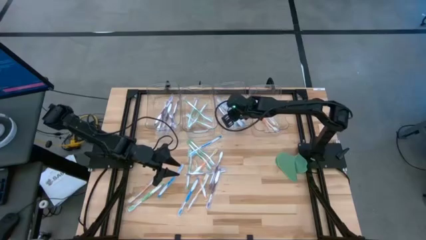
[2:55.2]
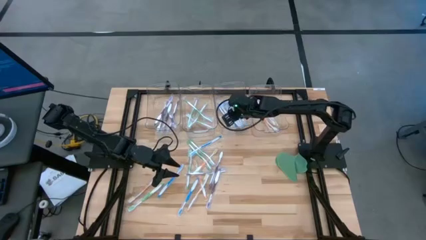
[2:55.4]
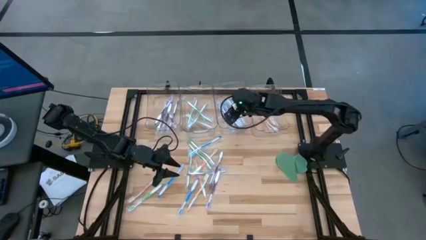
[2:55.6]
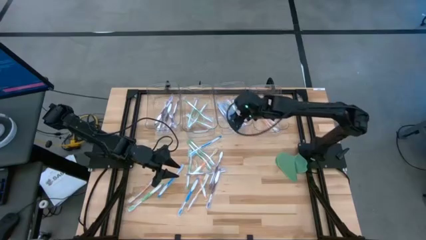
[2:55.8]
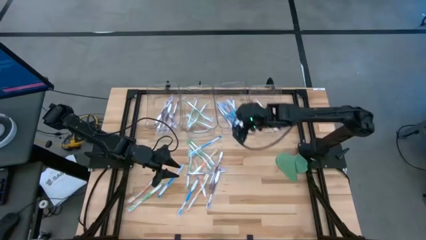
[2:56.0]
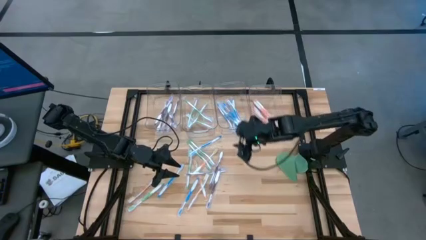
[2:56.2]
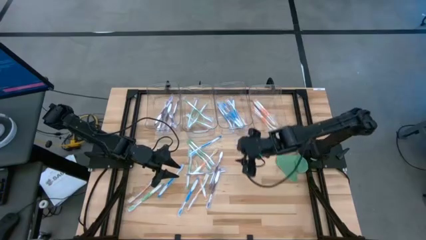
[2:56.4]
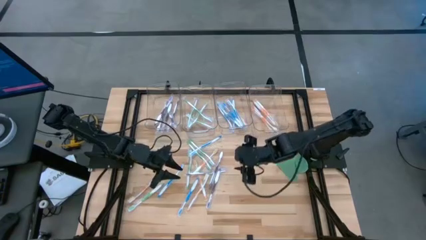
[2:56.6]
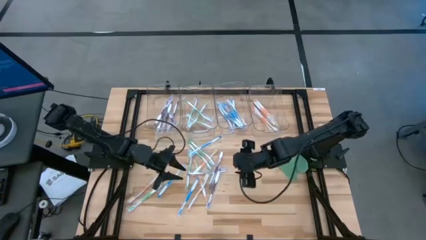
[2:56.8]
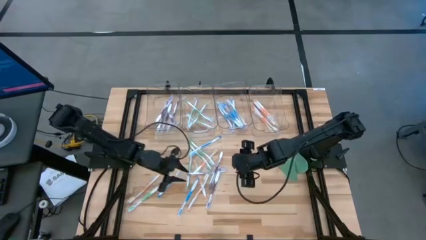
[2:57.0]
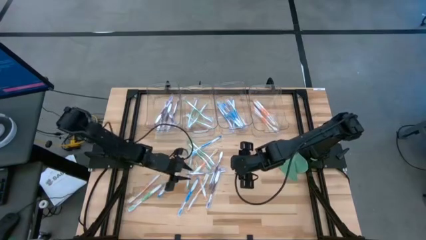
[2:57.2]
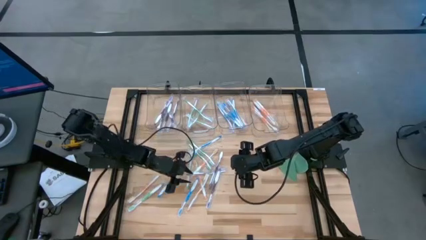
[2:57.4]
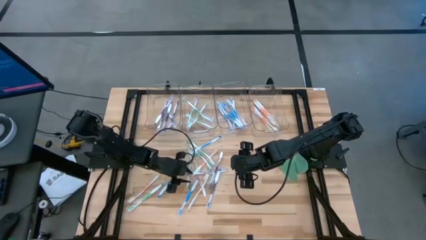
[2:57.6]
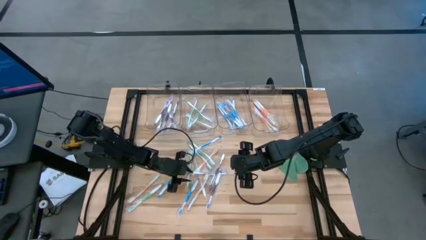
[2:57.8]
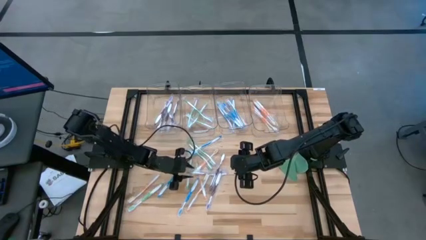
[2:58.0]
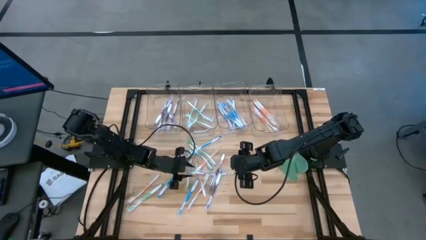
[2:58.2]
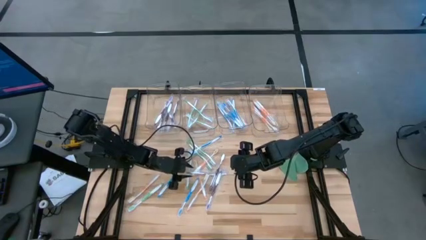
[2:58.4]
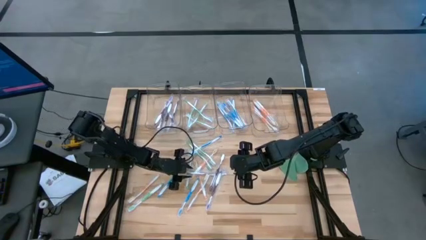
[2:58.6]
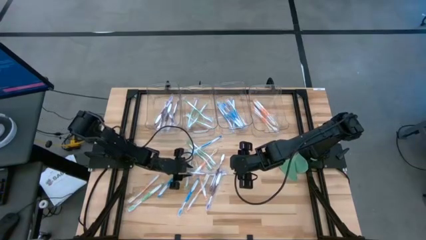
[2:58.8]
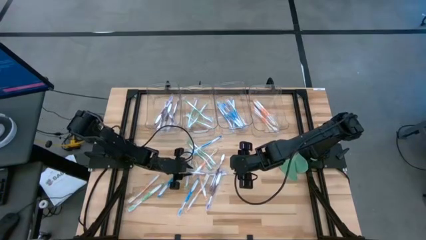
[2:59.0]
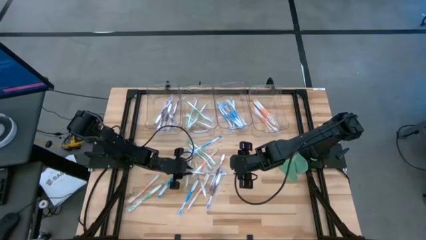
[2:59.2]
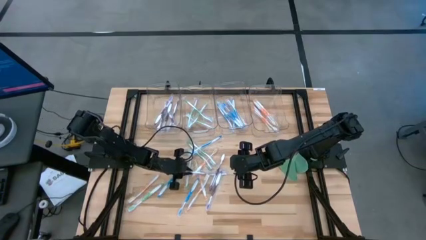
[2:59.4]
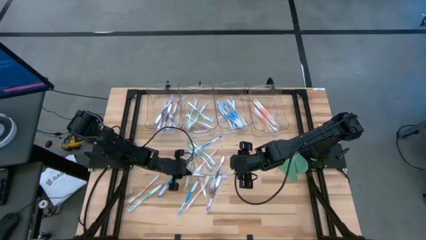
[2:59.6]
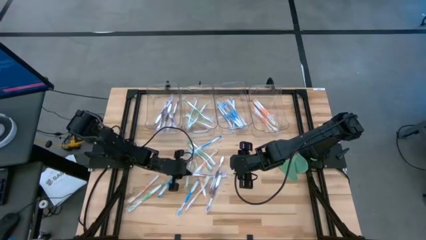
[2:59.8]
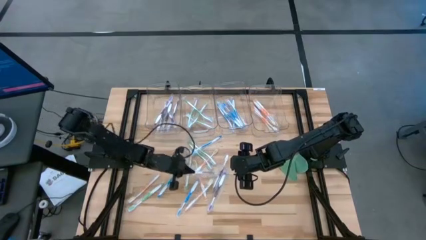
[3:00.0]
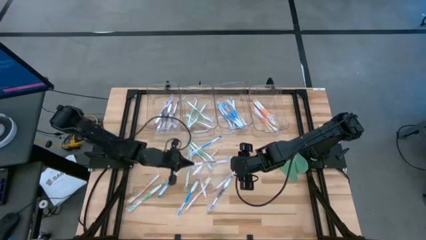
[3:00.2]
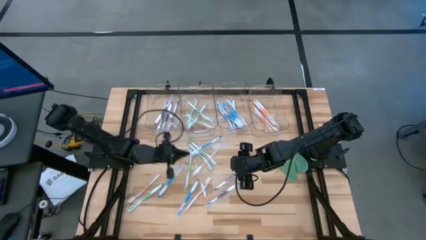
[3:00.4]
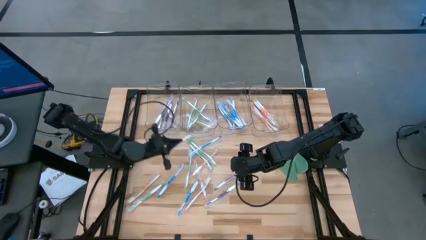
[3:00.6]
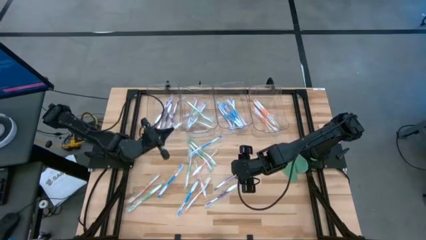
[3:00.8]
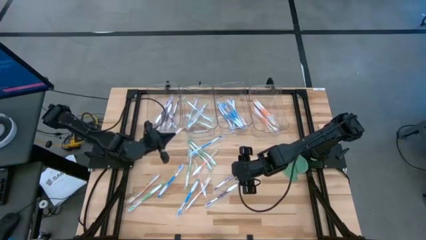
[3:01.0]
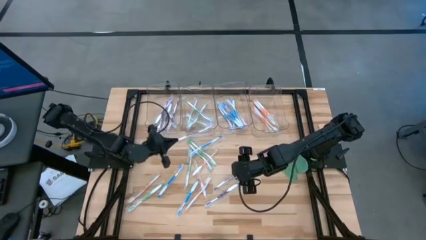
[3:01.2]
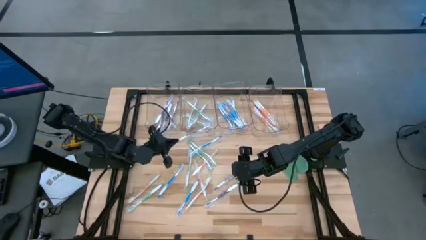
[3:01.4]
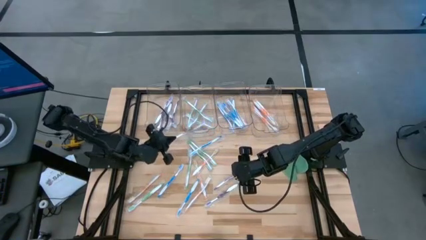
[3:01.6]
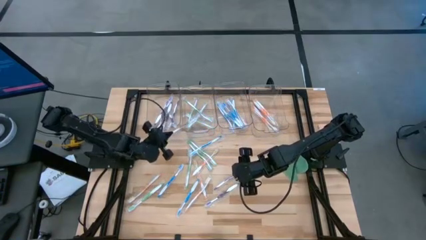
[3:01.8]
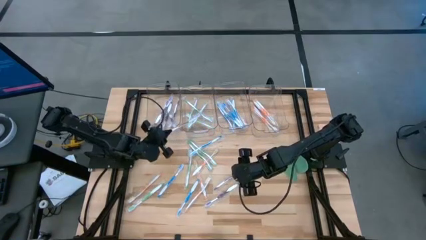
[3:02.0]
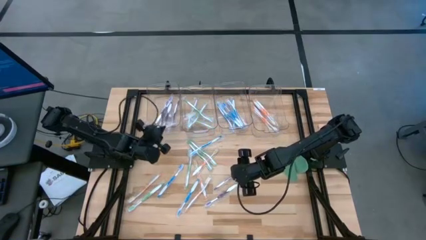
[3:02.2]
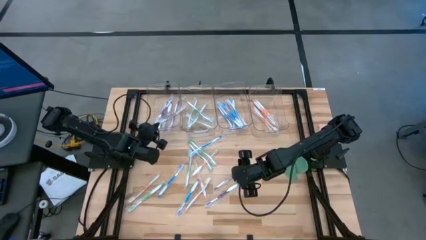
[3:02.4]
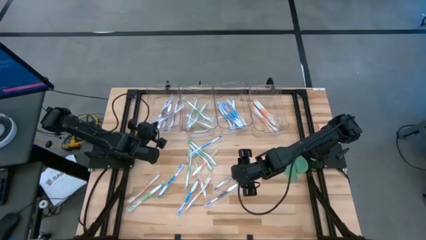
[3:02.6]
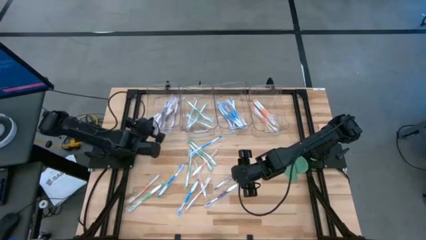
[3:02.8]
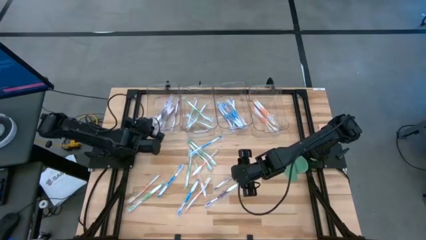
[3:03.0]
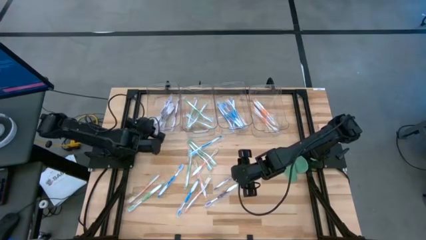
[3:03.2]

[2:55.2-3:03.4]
Task: Pick & Place Toothbrushes
Put the purple toothbrush into the left transparent bin

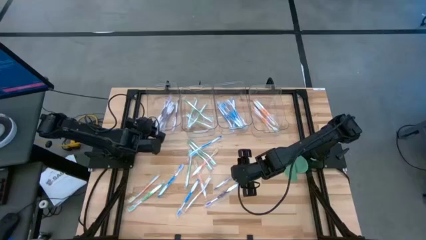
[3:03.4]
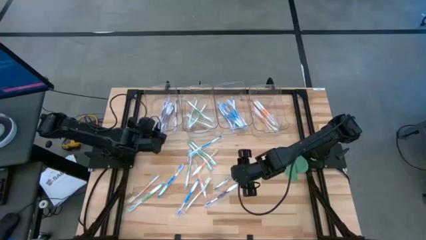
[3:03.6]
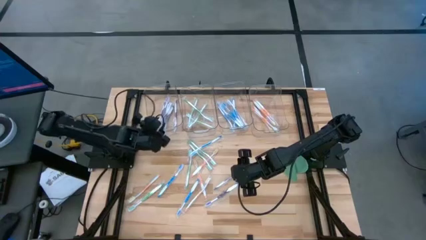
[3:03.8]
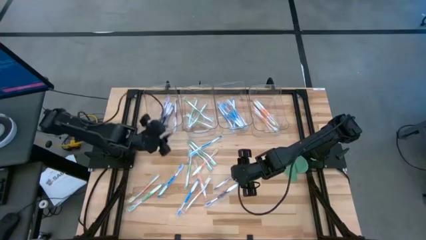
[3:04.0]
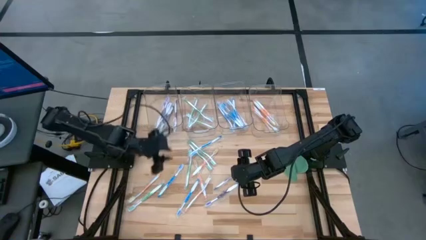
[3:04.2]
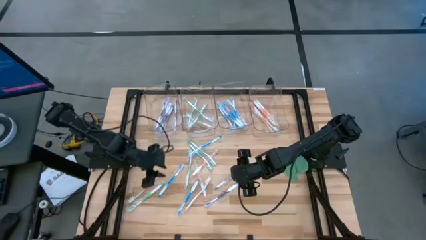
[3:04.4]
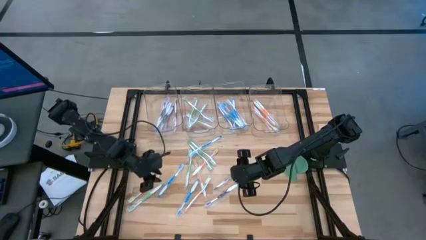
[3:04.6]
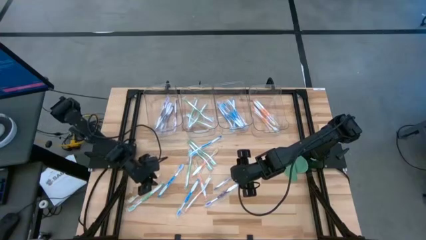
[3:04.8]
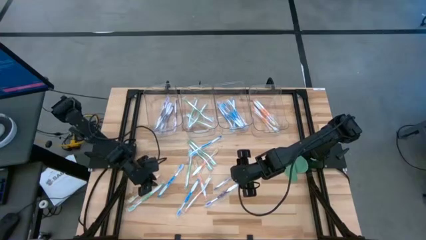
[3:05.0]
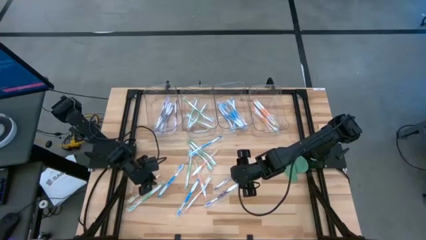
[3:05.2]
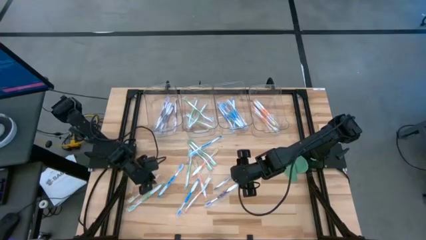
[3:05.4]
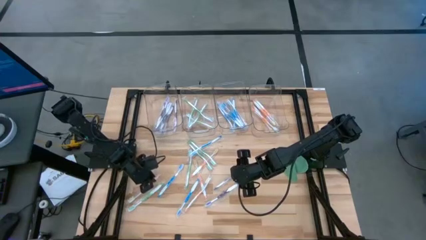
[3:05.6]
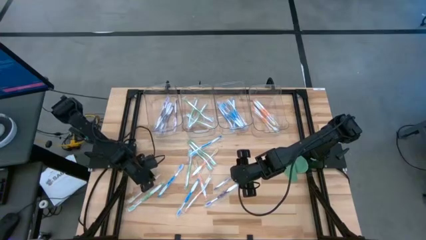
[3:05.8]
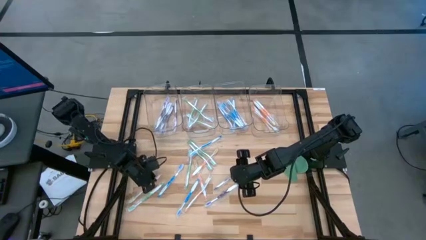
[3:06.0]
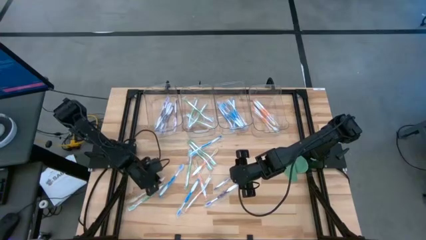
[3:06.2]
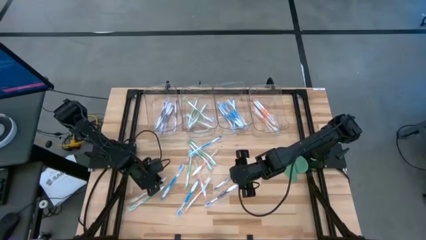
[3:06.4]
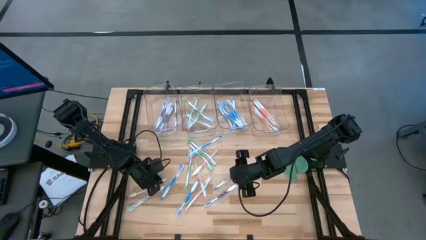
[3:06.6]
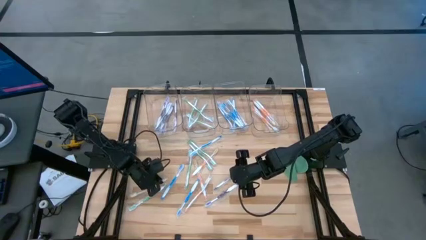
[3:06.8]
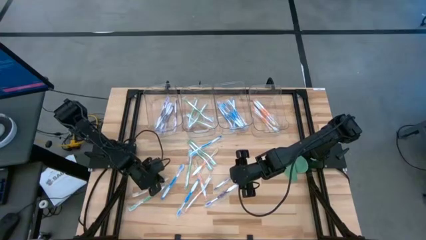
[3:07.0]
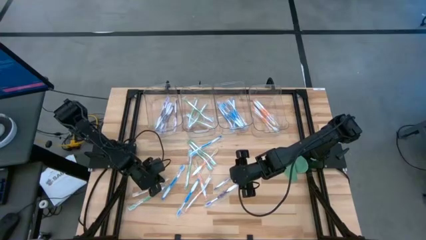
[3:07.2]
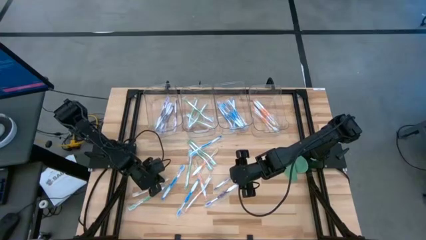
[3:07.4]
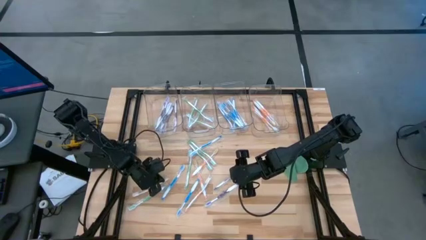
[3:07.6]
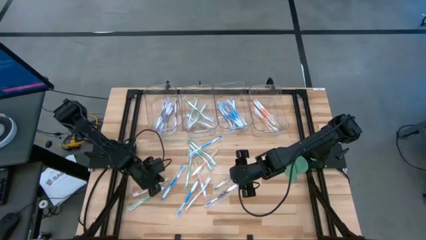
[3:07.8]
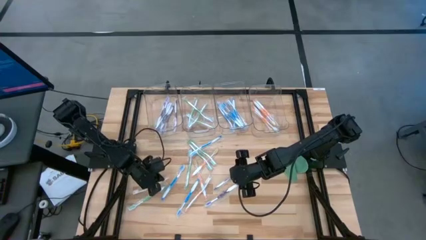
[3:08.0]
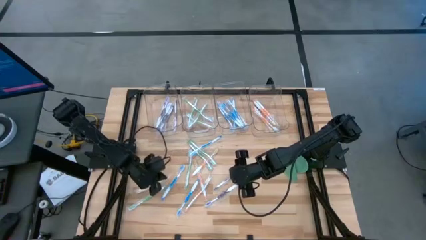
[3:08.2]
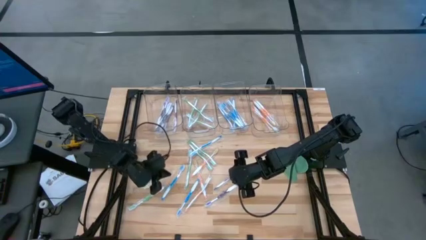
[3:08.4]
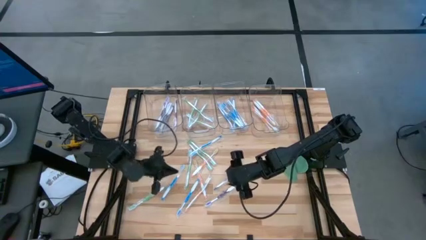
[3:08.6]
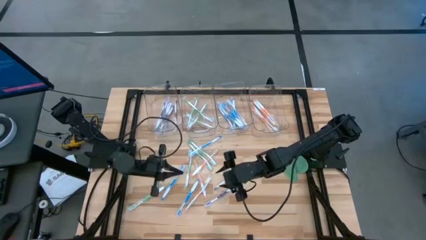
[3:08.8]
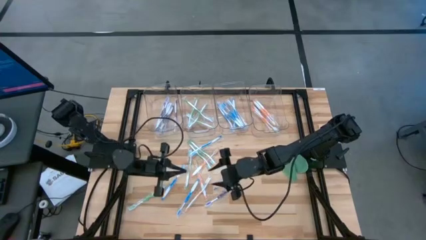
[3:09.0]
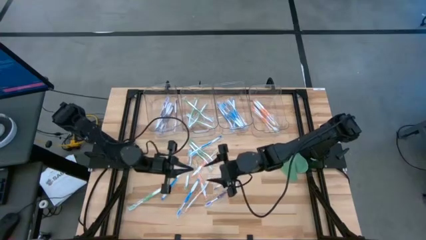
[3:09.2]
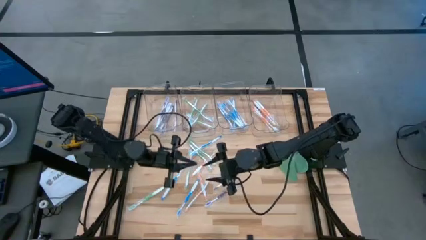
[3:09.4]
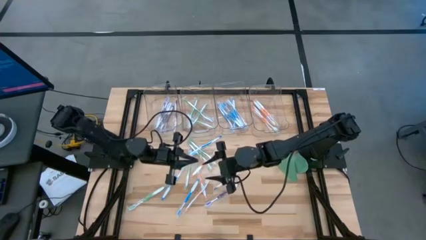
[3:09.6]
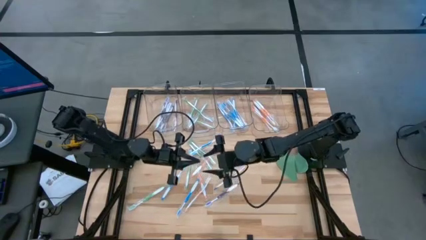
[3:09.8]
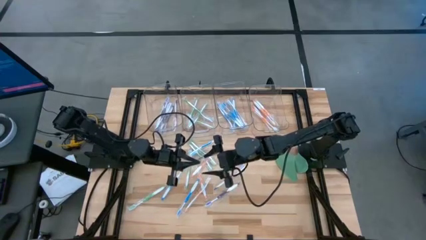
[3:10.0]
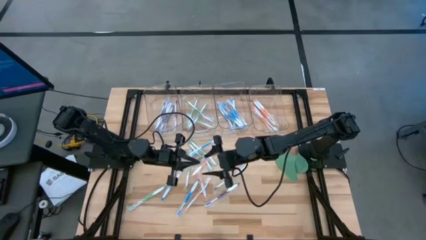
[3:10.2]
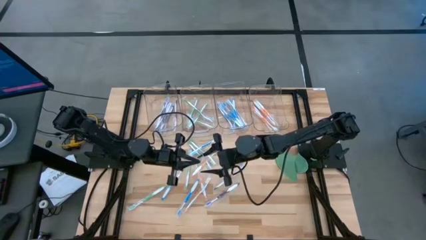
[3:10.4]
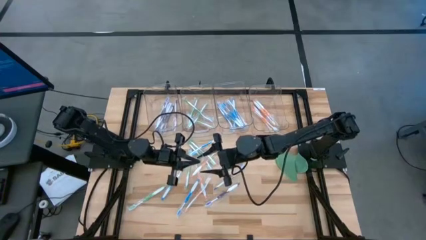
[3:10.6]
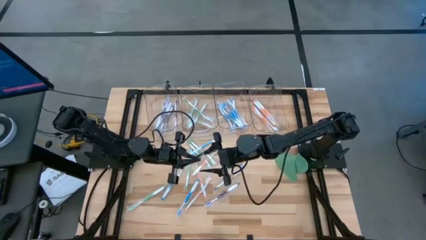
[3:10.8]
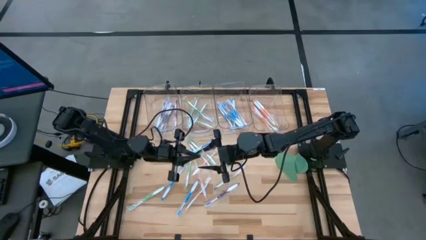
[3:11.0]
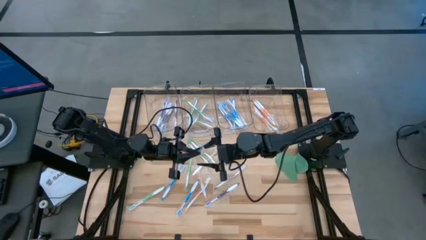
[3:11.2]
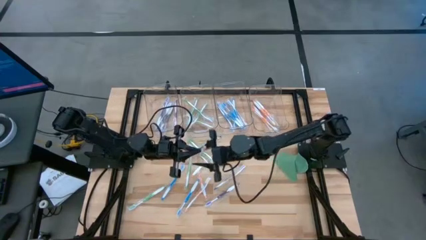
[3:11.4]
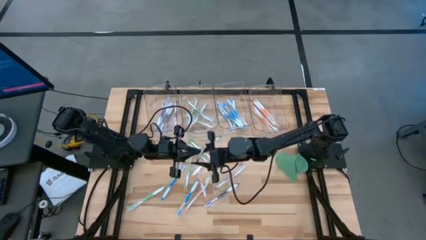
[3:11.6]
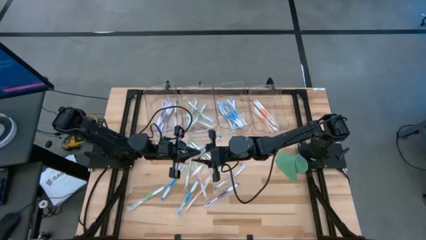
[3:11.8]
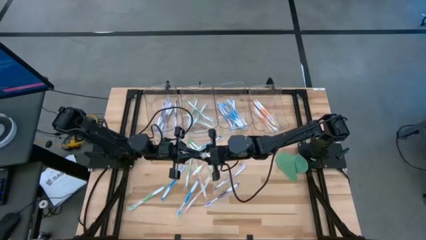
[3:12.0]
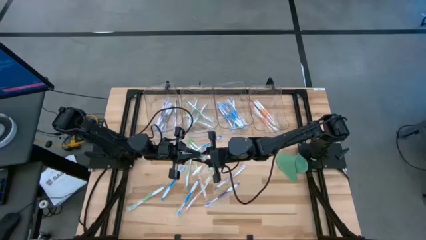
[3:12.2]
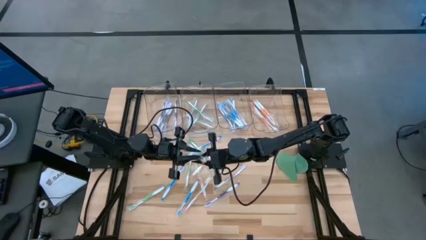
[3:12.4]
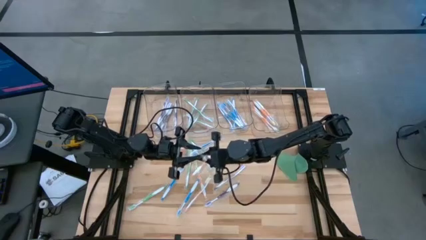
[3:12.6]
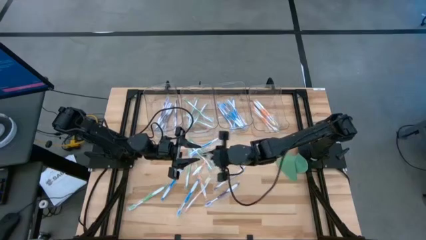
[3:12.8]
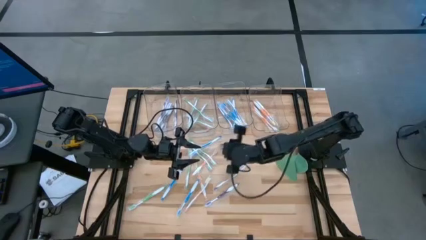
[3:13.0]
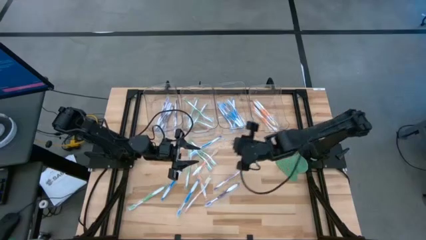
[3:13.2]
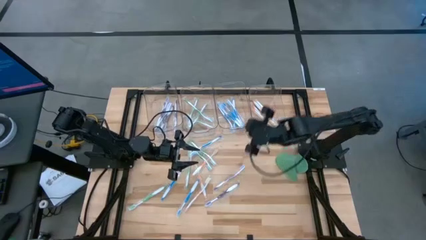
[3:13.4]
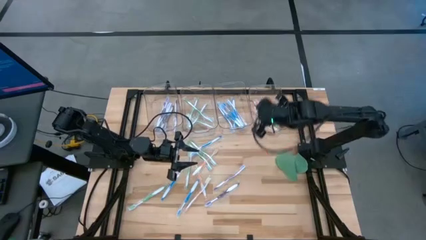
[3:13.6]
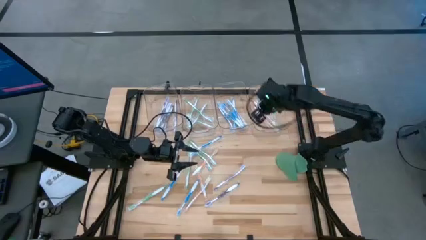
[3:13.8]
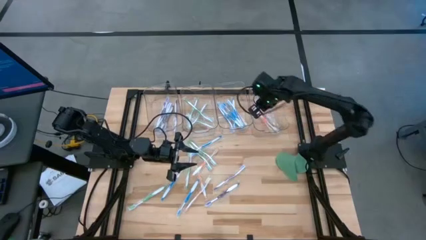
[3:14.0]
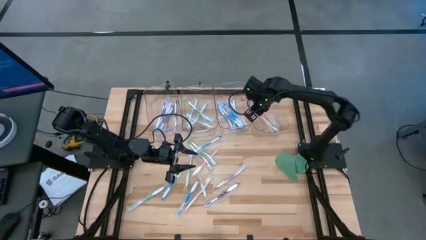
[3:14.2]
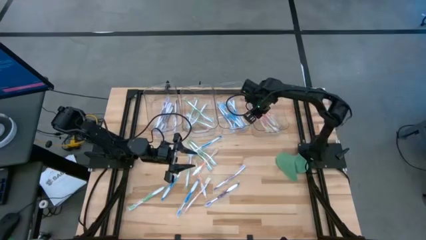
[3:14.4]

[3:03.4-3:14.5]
Put the orange toothbrush into the right transparent bin
